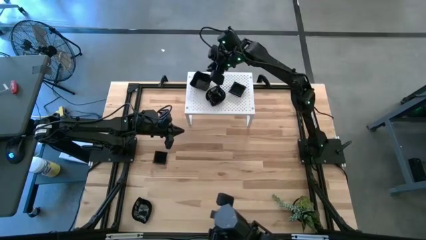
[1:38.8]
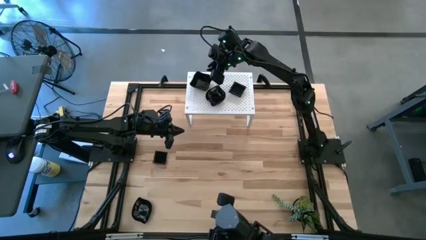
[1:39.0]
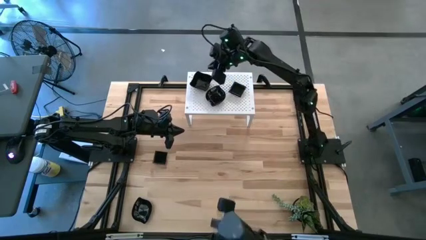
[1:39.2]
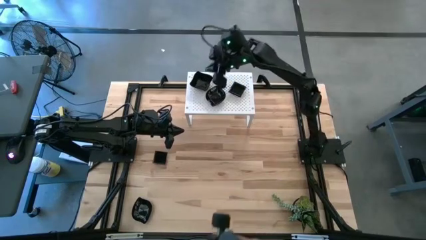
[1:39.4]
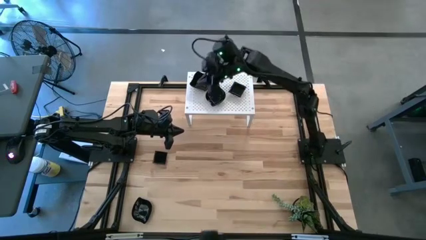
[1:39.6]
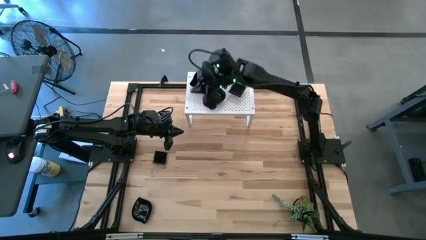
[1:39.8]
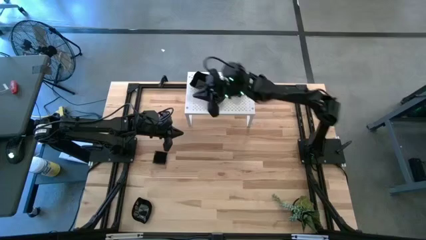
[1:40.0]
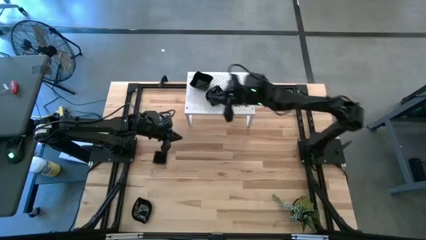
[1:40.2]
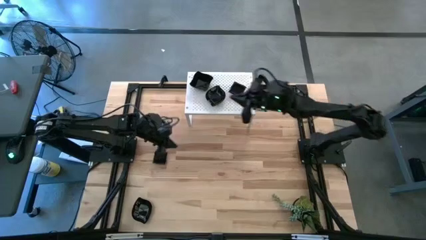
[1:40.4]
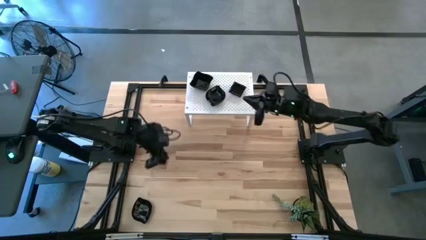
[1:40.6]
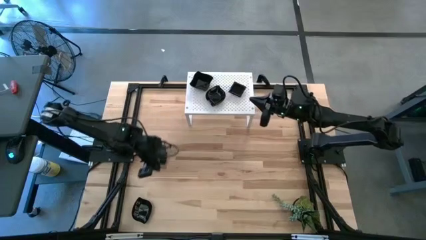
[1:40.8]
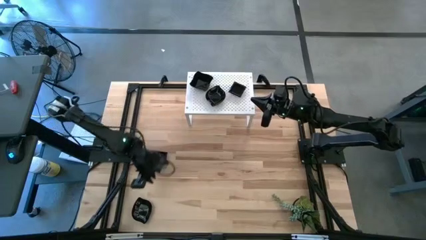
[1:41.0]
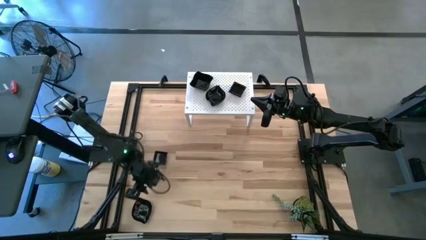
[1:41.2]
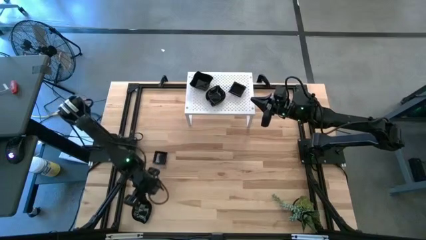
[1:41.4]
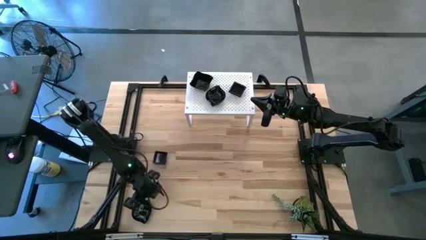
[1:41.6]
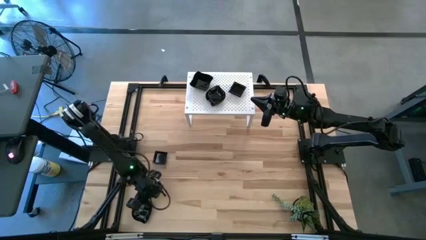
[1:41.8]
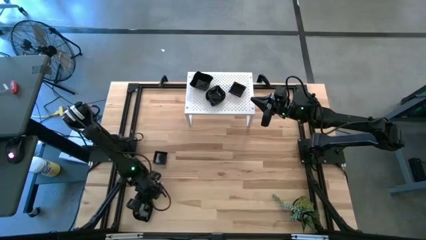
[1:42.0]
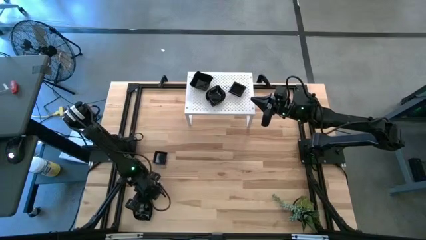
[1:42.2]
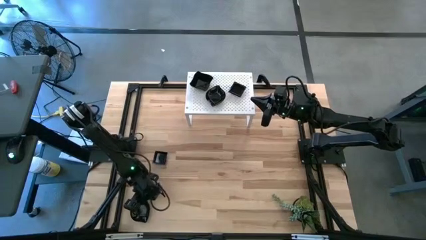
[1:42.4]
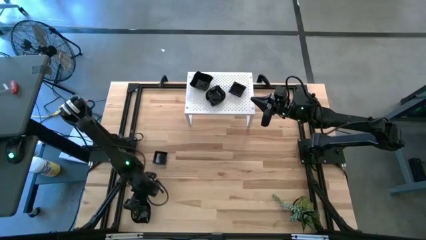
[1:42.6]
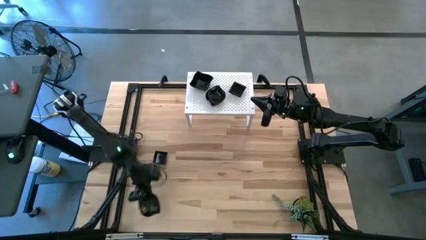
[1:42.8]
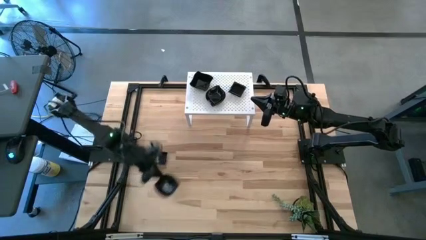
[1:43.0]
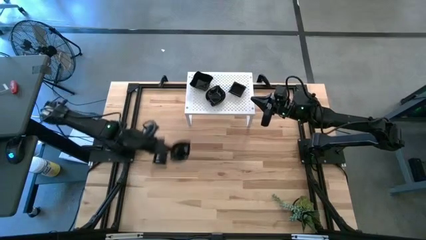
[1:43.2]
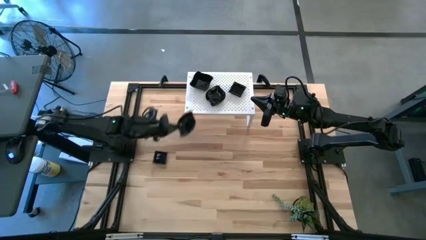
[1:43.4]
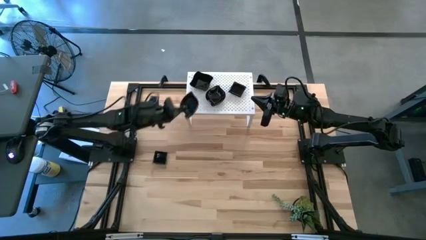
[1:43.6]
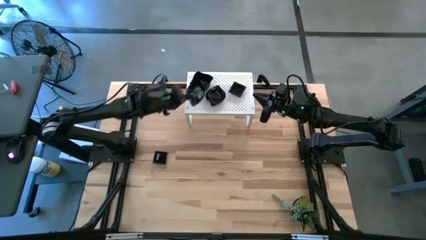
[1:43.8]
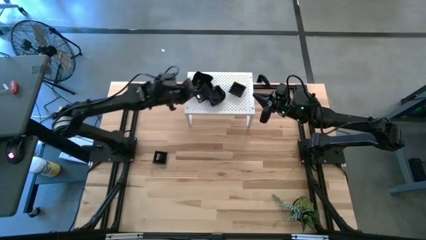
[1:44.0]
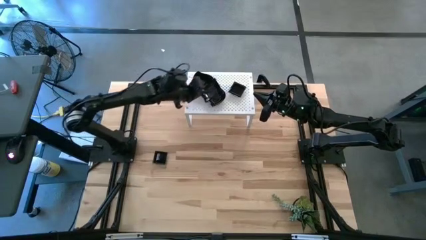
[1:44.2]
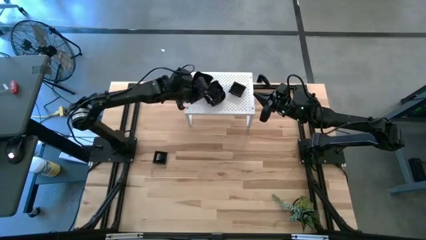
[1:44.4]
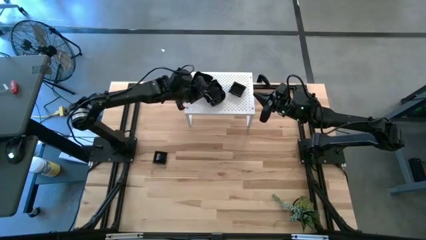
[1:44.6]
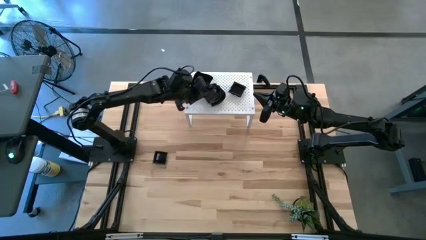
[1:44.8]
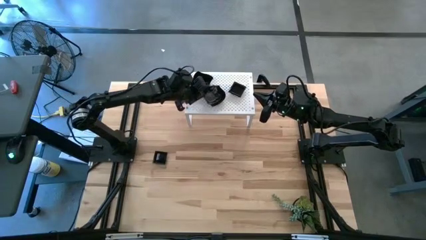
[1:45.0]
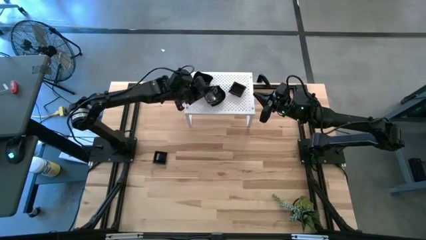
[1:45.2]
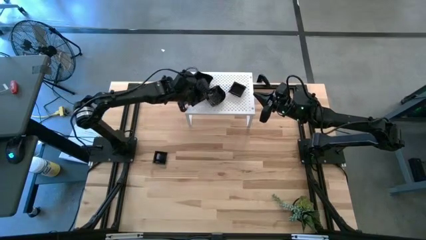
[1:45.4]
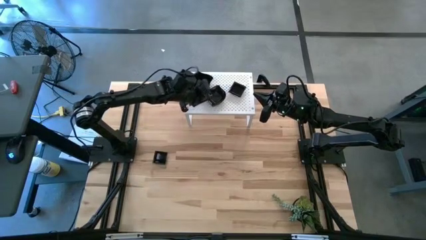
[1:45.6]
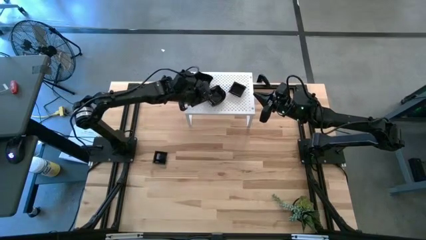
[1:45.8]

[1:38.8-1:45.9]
Task: Pick & Place Mini shaped plates
Stack the black leaf shaped plate on top of the black leaf shaped plates on the shelf

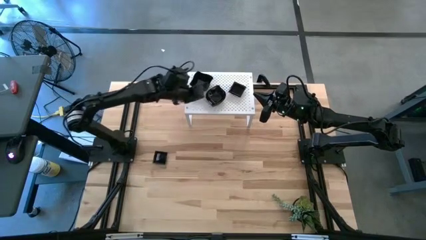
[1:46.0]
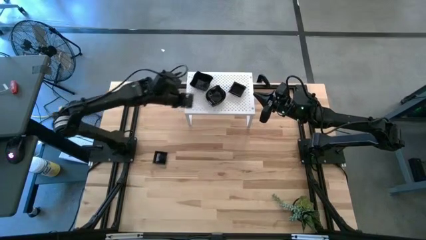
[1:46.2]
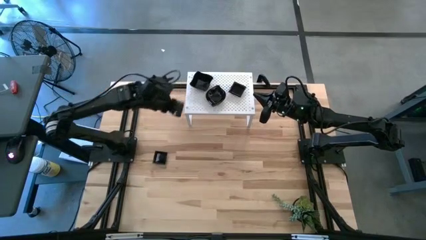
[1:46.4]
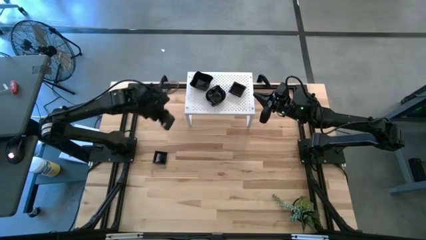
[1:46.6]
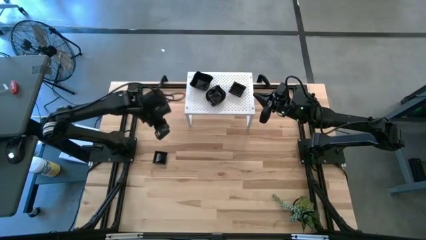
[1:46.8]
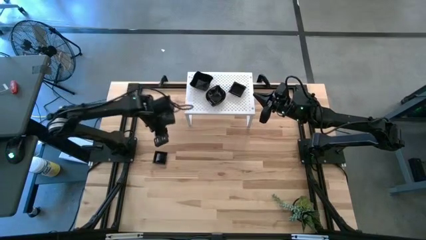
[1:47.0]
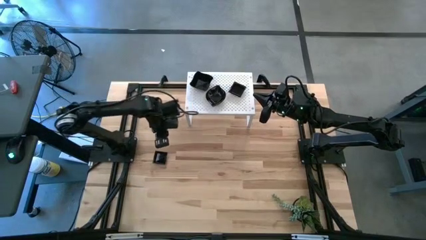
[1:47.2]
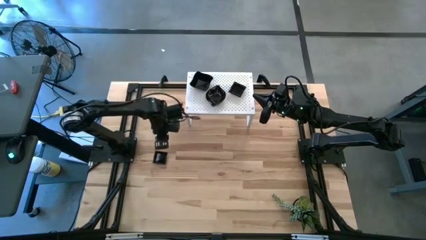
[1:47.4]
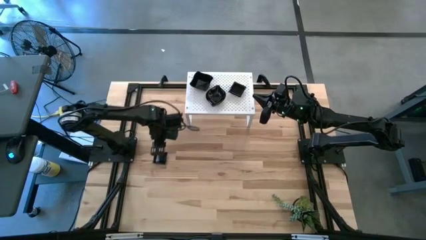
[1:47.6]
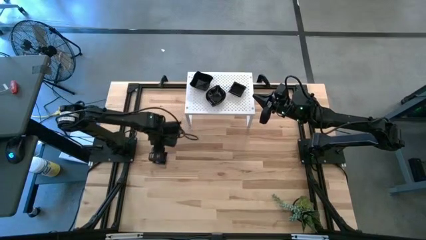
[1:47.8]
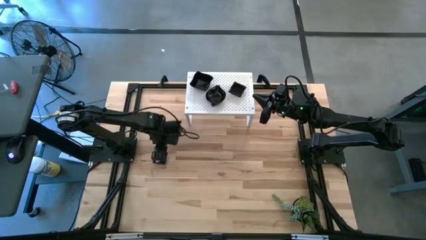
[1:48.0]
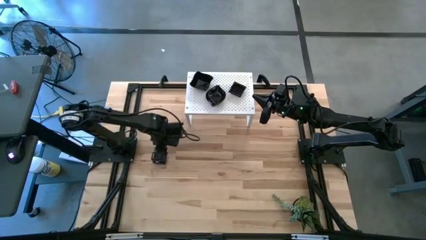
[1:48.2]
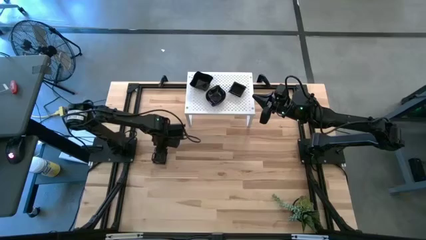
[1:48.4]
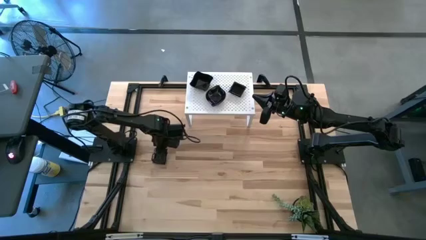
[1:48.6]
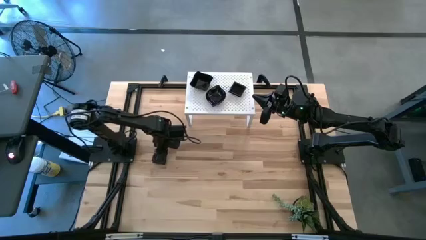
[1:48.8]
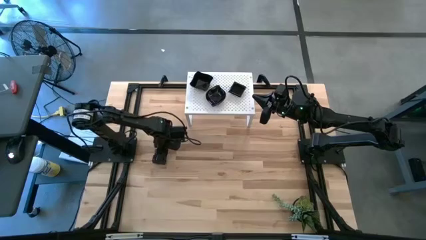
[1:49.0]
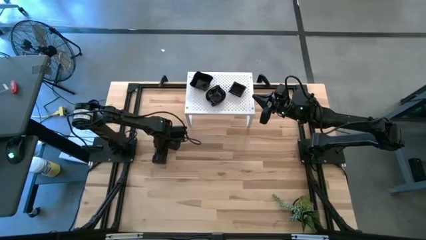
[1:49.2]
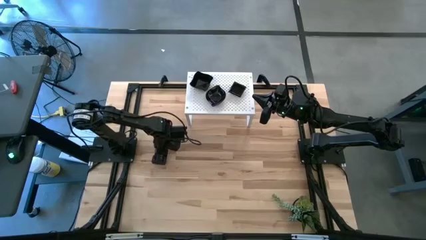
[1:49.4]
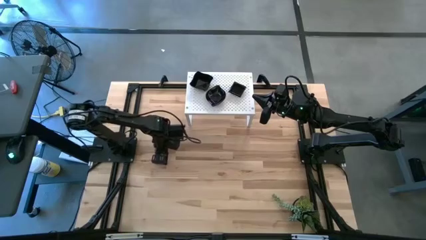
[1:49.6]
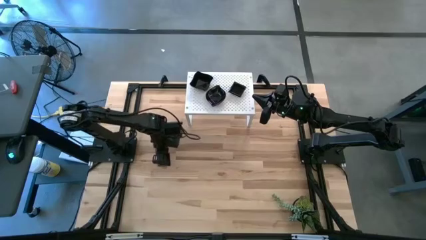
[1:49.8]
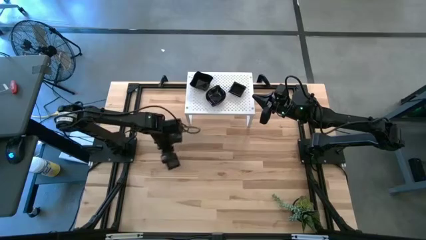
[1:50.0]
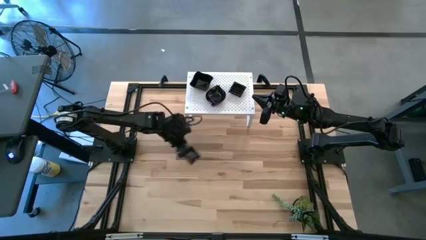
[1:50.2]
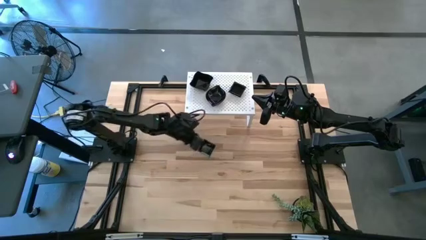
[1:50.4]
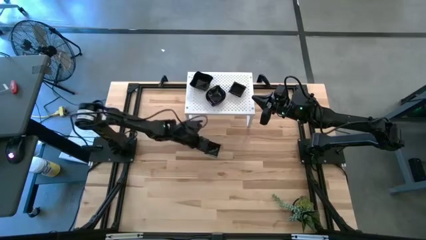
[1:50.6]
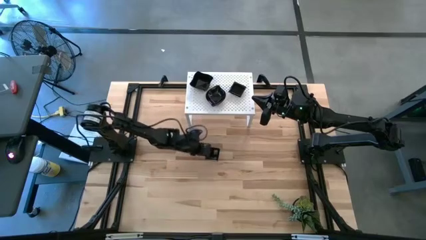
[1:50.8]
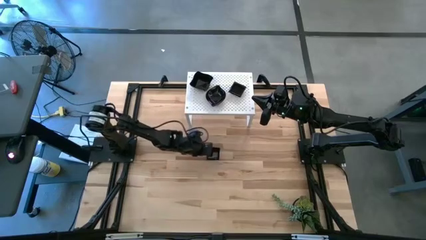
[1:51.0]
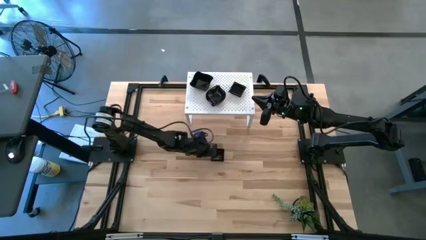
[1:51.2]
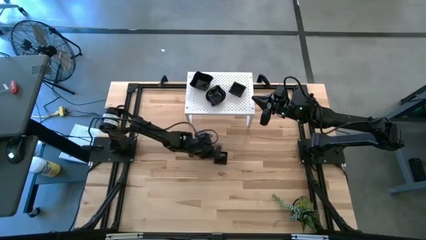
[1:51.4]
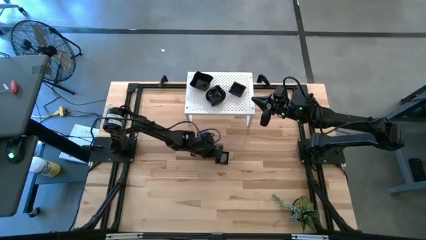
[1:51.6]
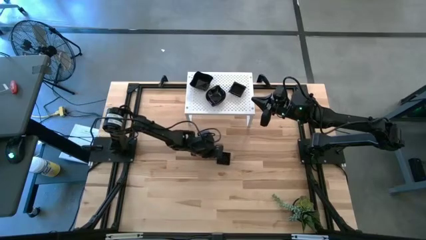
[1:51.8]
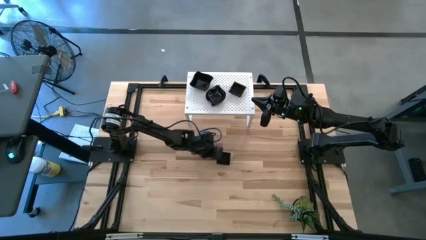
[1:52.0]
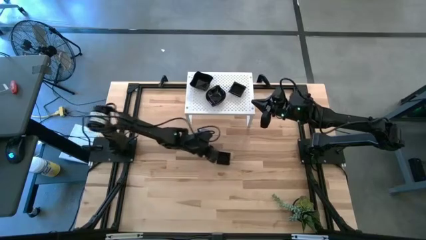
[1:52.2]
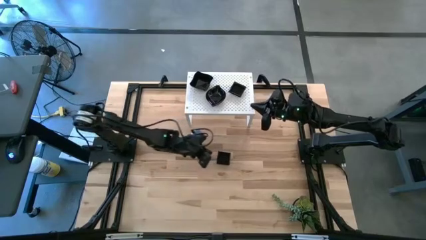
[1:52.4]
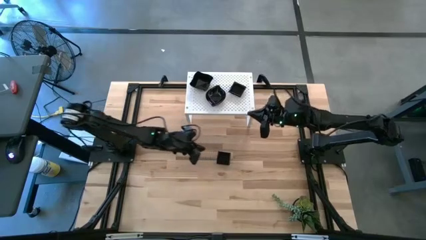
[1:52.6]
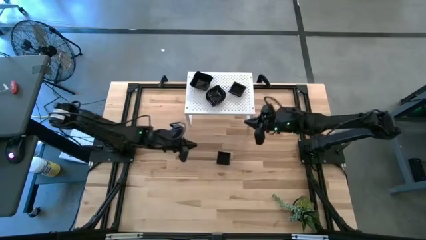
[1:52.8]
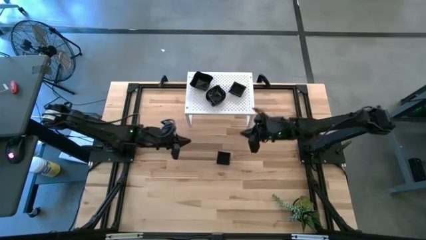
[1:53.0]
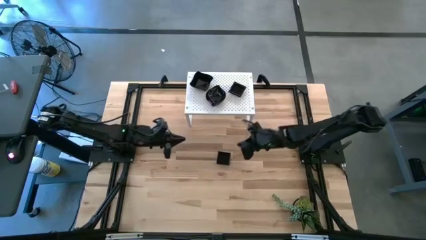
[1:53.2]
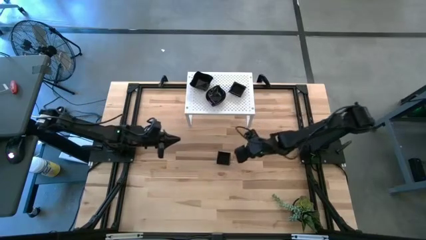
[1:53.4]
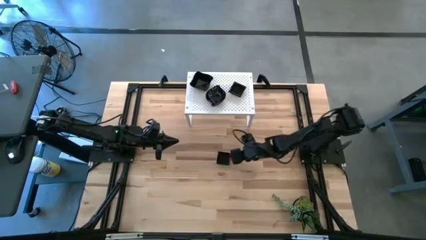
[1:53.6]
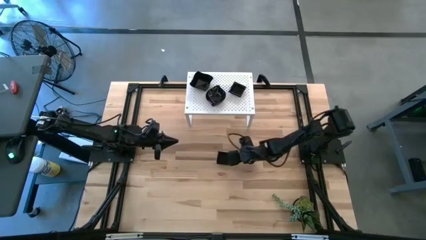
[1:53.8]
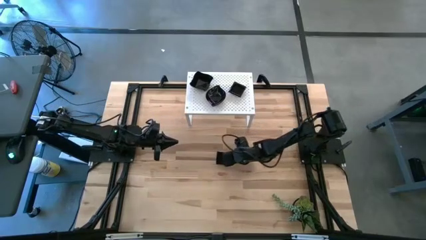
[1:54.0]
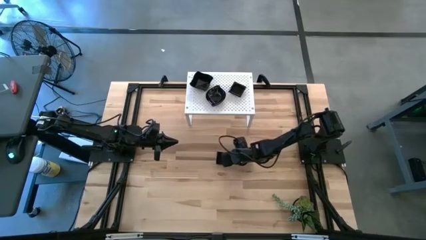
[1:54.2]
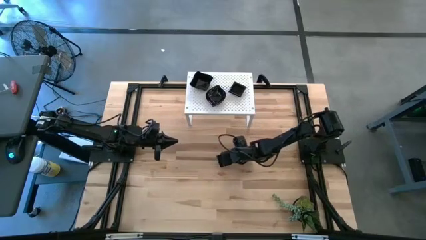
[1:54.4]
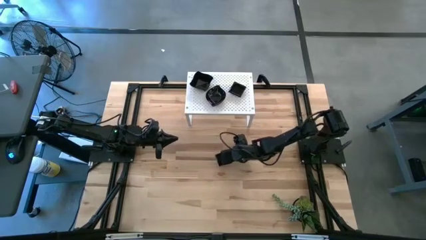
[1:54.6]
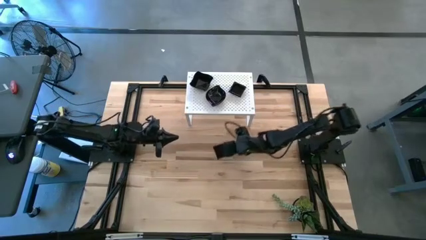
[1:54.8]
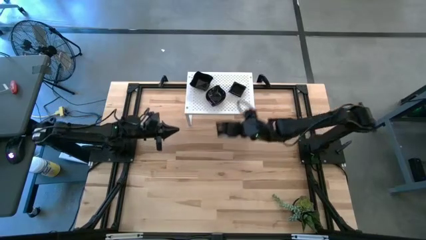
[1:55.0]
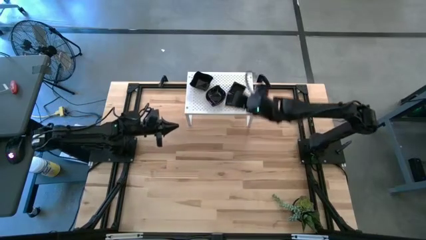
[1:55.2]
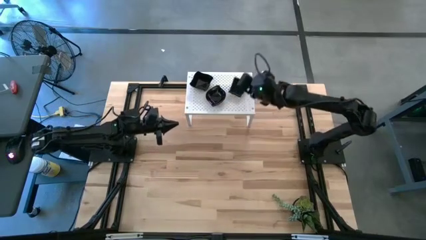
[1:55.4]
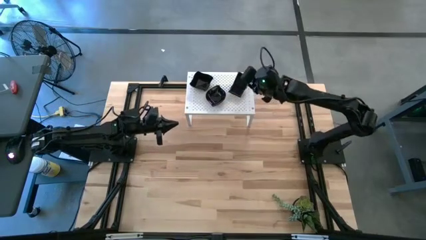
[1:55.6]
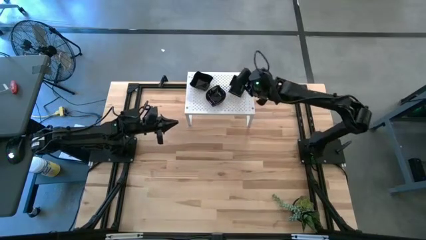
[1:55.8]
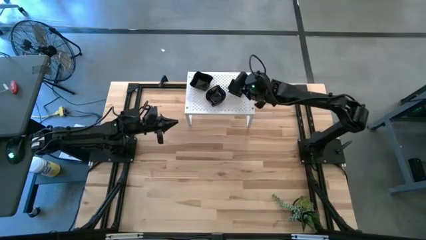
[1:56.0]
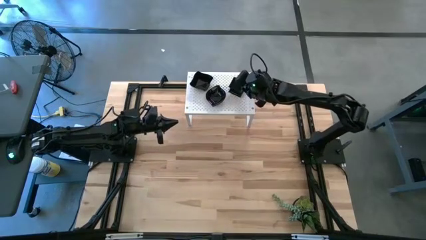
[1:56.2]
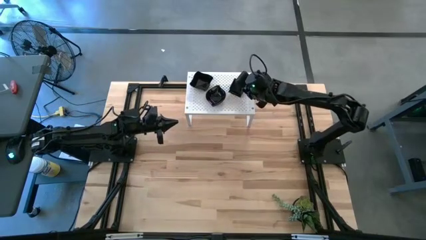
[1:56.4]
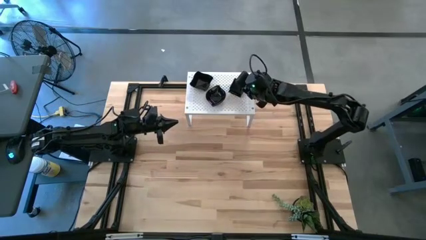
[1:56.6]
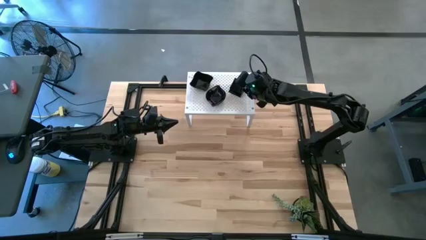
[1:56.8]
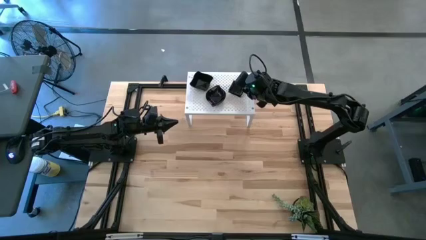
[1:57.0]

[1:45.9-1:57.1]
Stack the black square plate on top of the black square plates on the shelf
